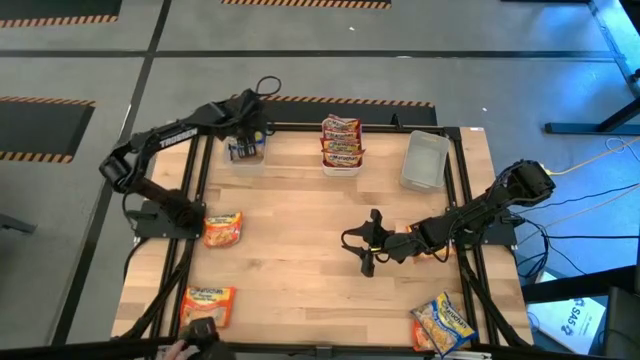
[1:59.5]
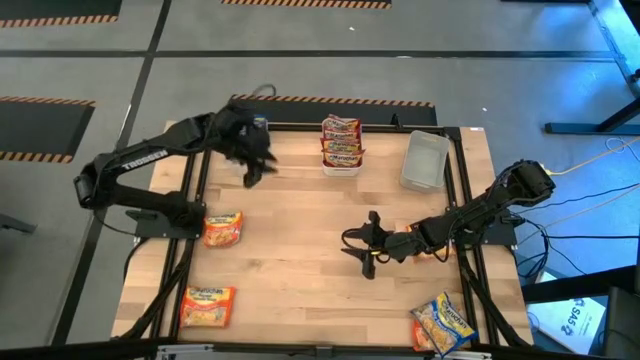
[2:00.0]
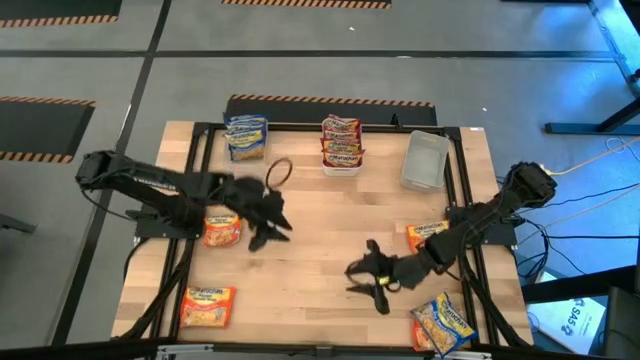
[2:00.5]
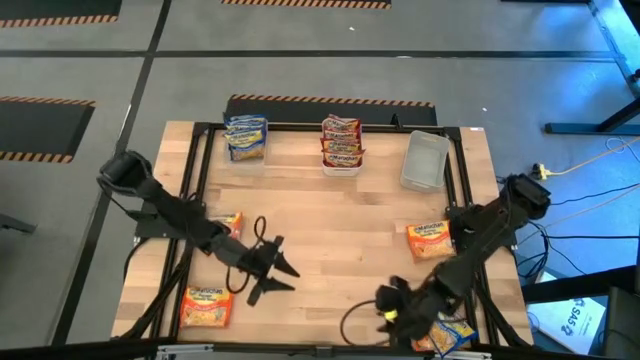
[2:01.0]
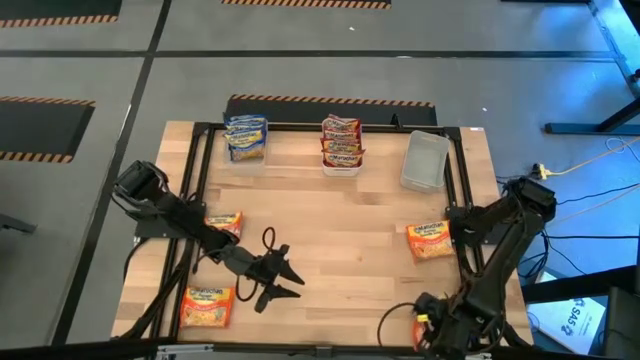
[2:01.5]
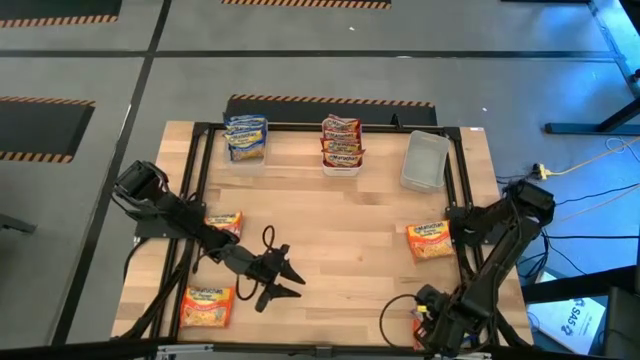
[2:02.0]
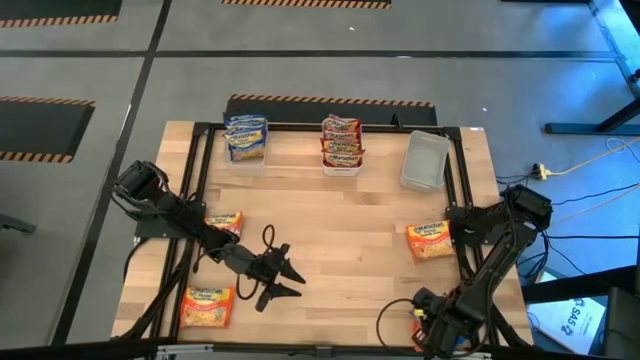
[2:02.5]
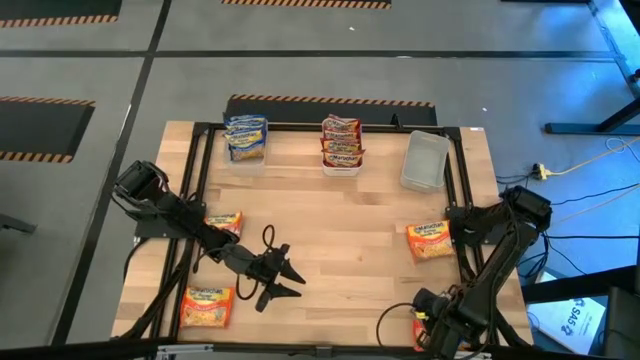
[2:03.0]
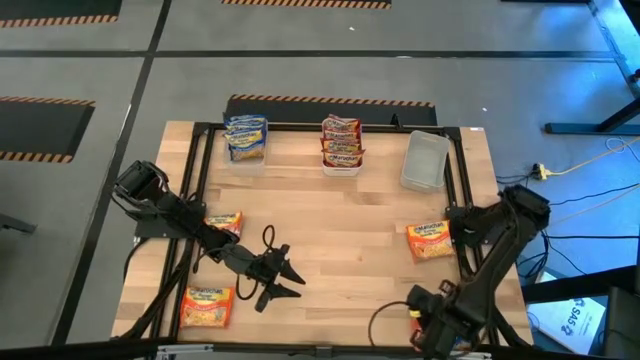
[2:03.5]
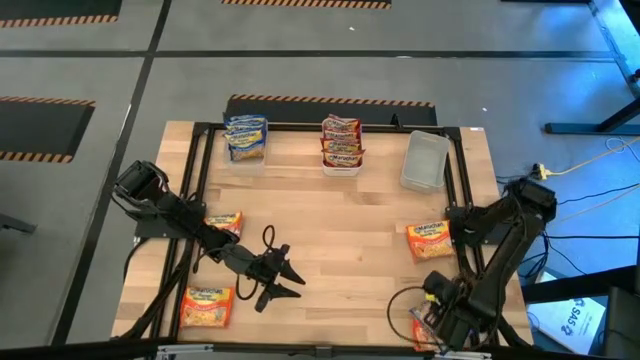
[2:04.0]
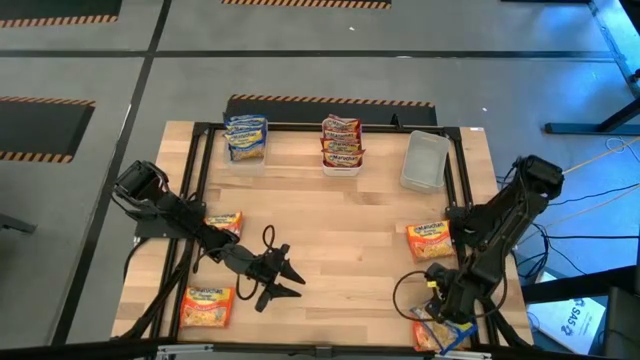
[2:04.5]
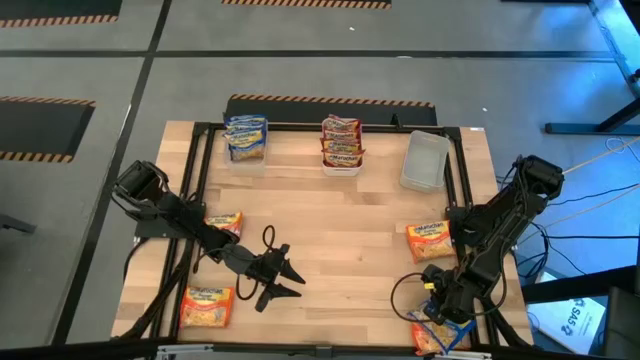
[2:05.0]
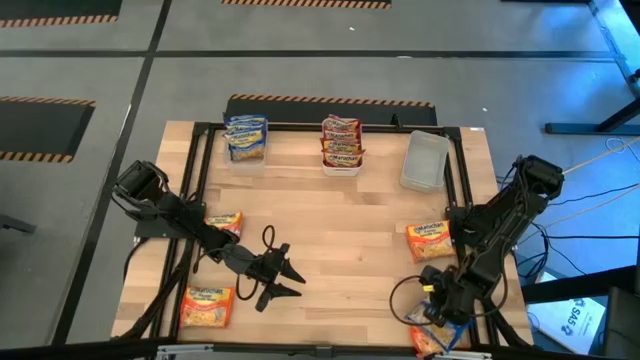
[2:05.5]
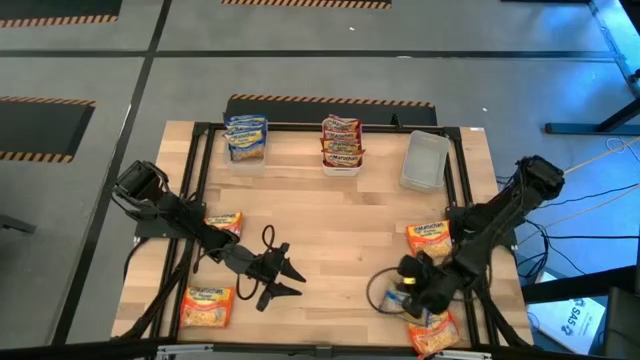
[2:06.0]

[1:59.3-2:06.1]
Task: Sort Maruchan noodles
Put the blue noodle pack into the transparent bin

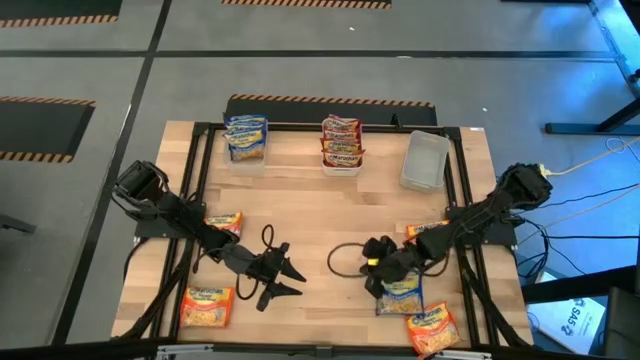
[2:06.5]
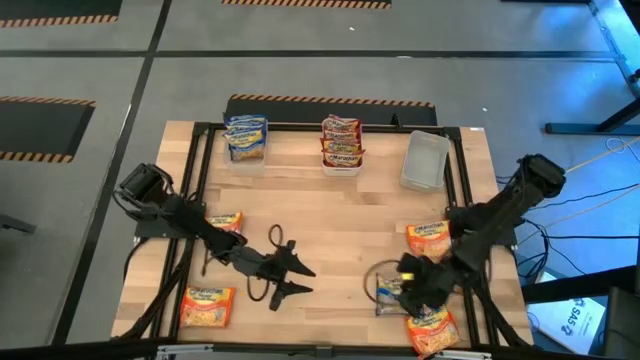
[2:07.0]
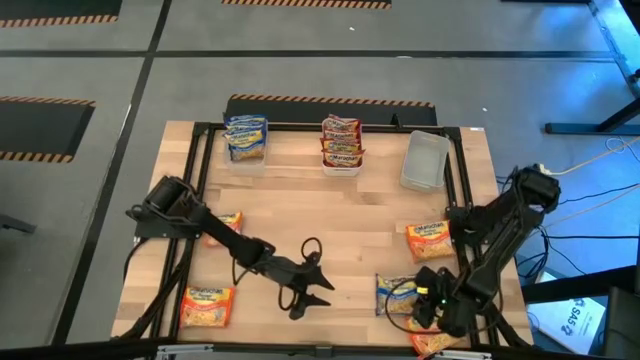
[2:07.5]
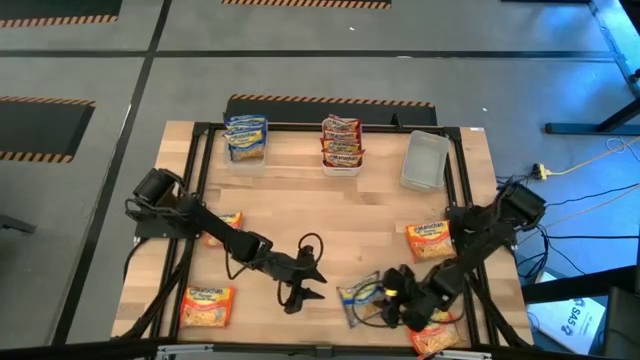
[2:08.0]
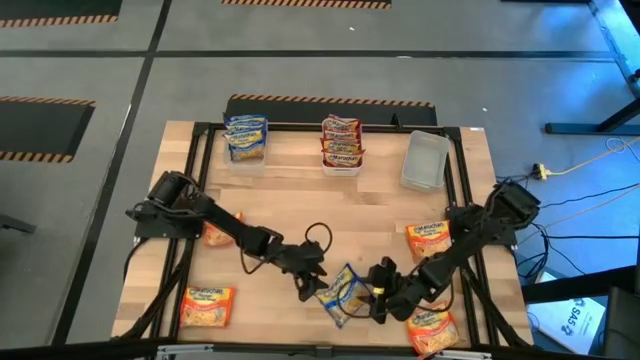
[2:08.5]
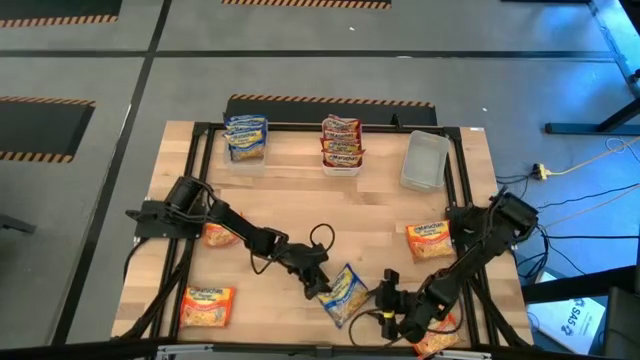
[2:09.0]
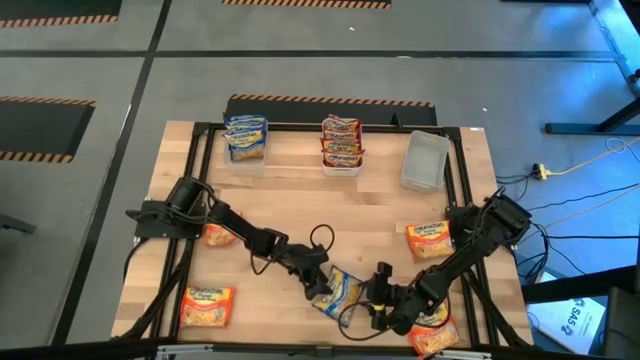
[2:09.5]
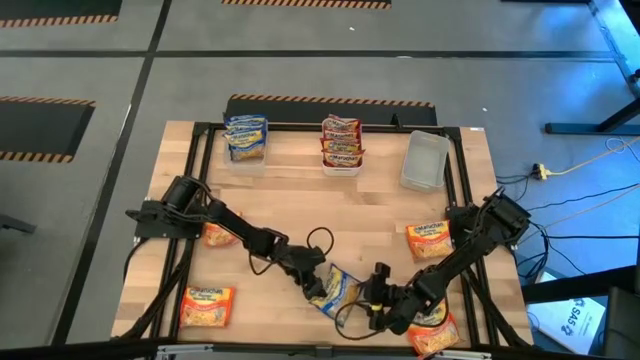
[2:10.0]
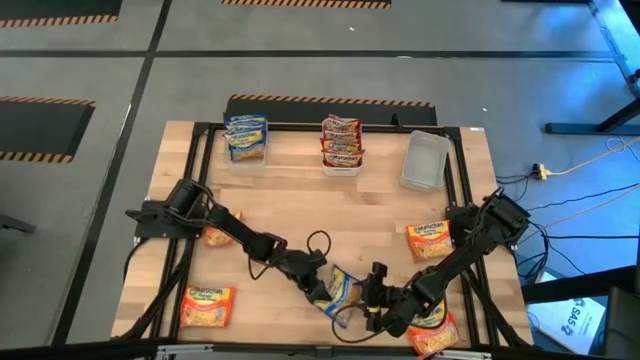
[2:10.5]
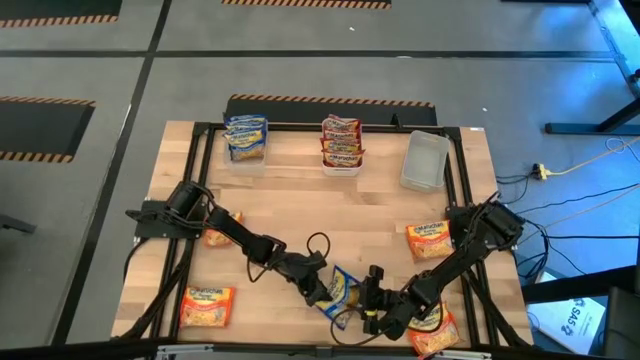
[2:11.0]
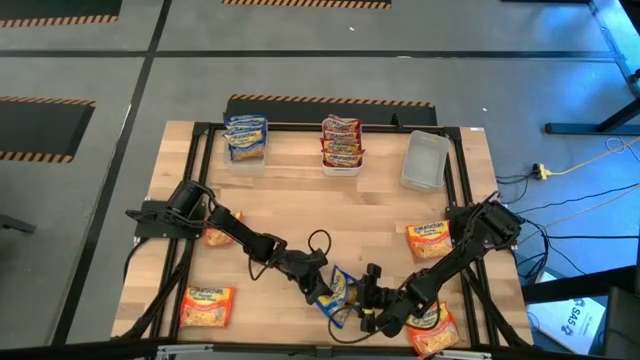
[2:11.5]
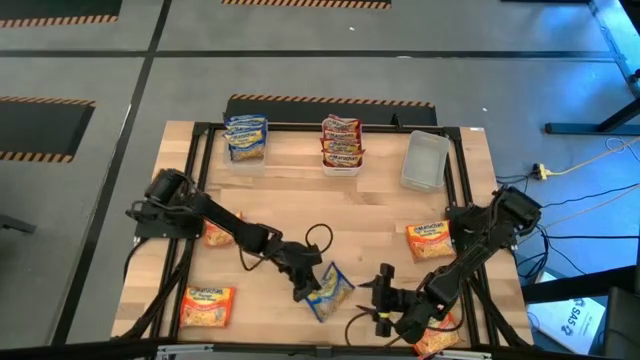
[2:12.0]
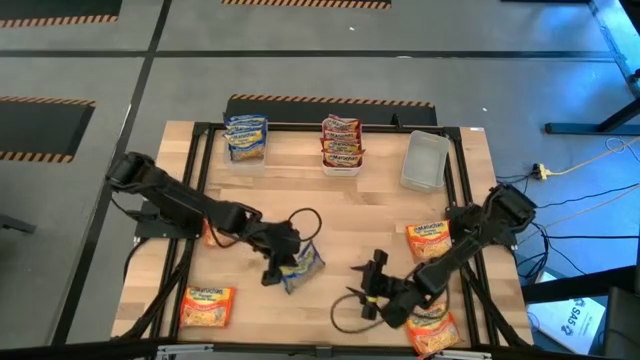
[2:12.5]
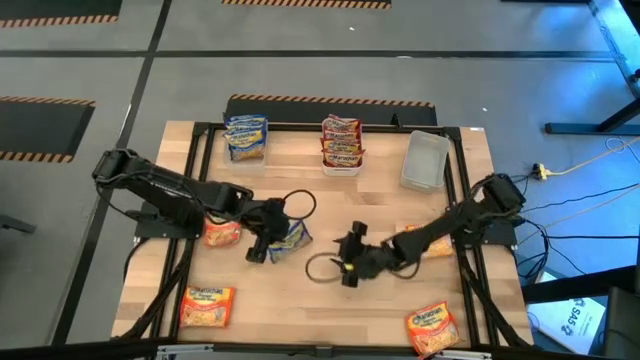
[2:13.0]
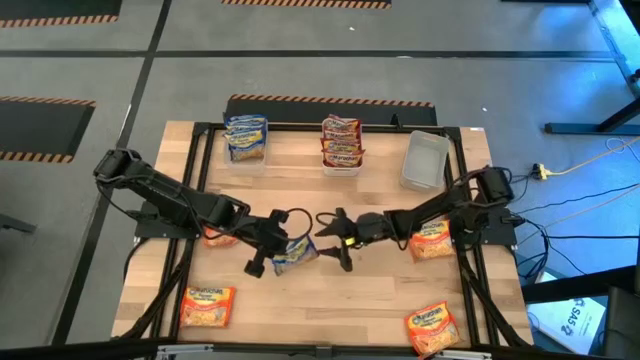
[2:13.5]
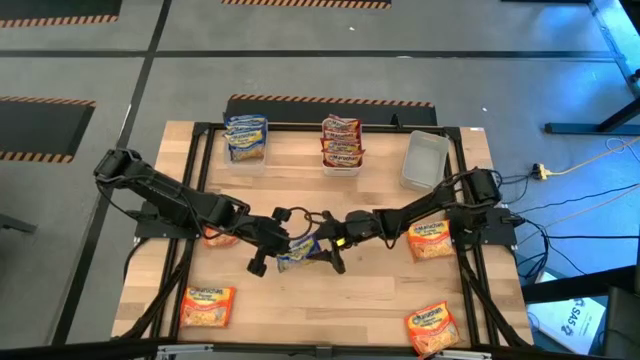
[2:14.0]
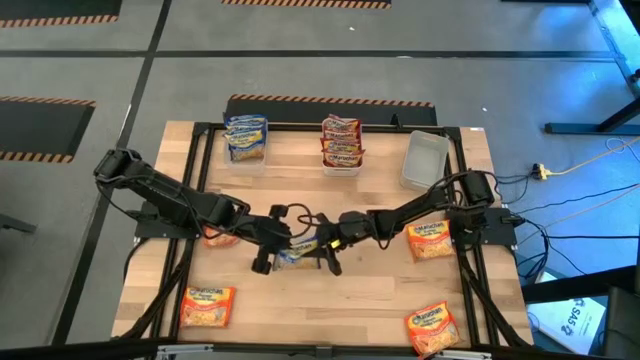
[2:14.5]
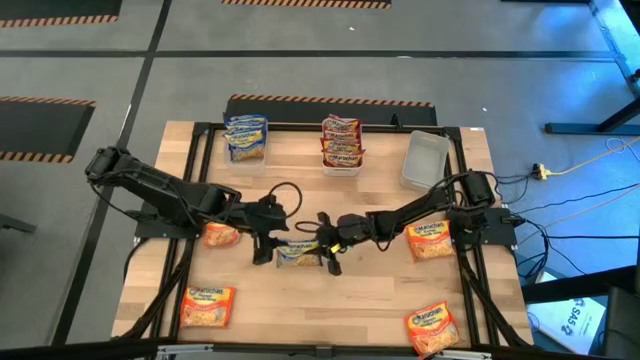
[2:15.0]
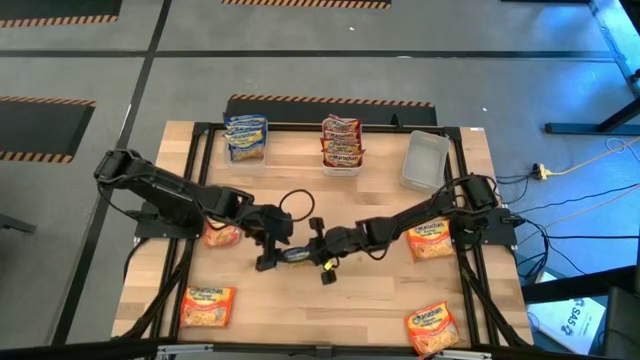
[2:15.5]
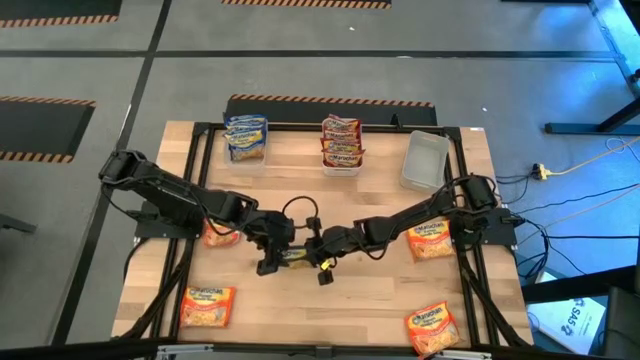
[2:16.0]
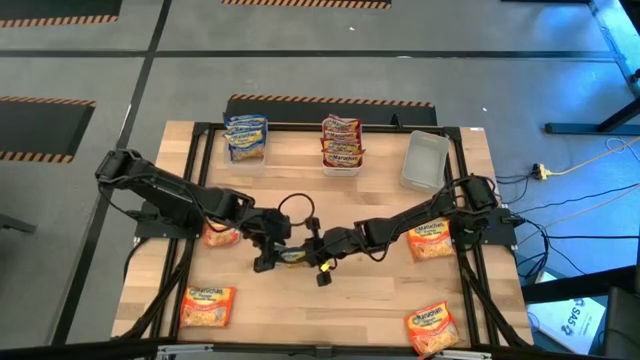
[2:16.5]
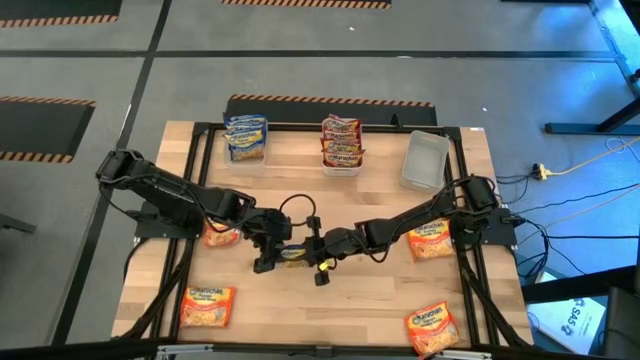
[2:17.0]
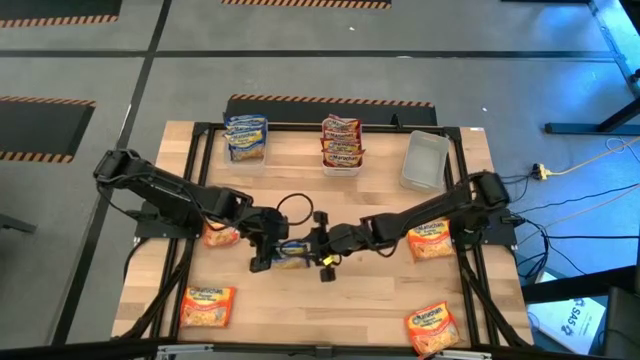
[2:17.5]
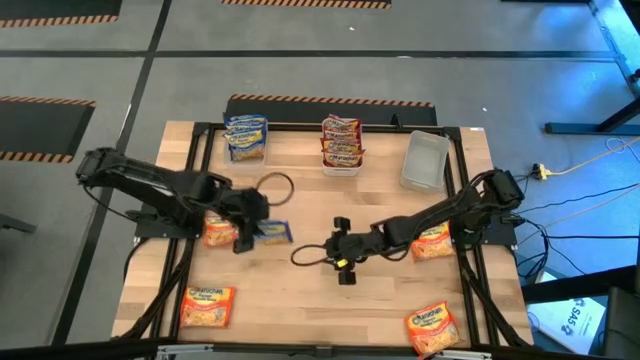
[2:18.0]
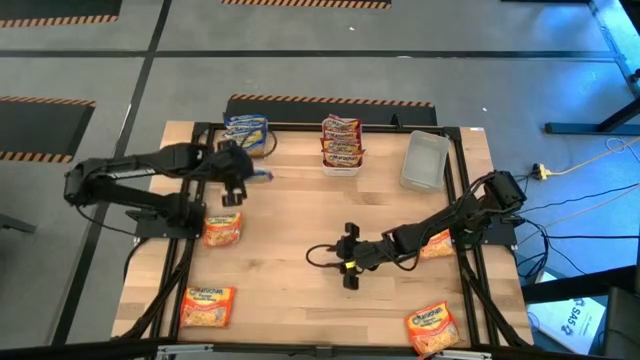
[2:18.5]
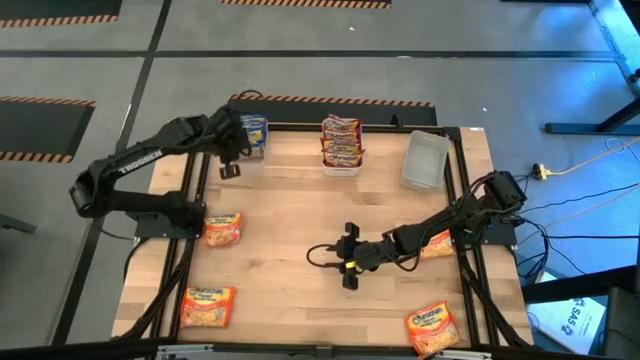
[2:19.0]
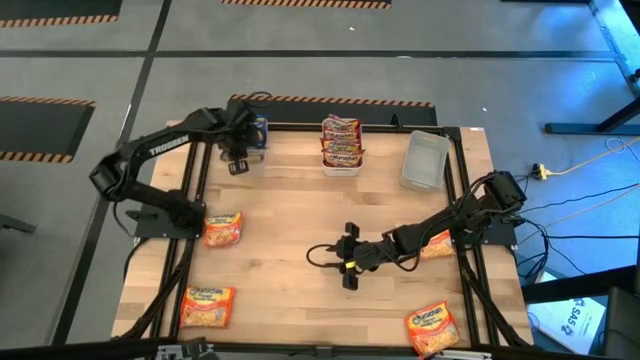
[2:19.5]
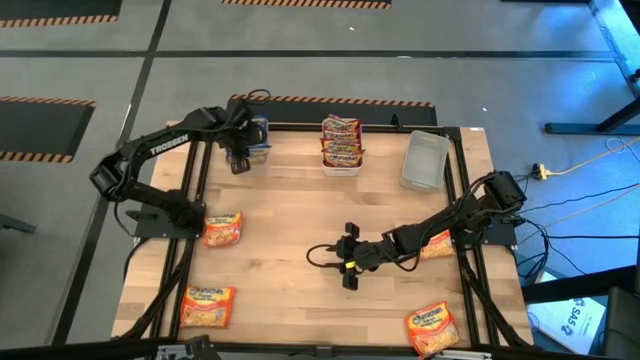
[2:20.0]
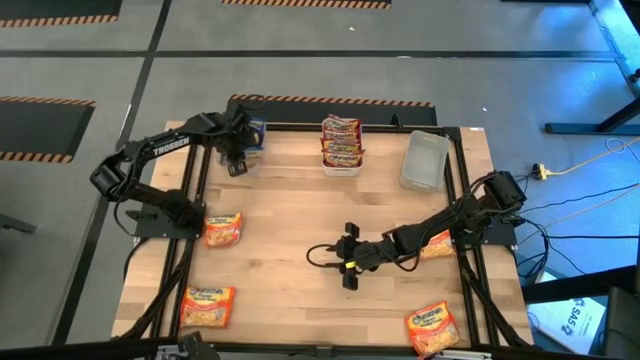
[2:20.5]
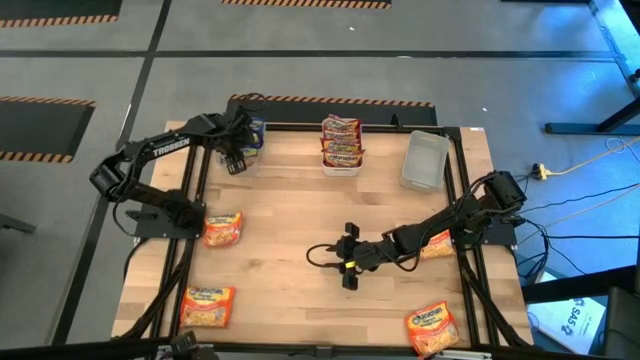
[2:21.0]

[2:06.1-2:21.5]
Put the blue noodle pack into the transparent bin
